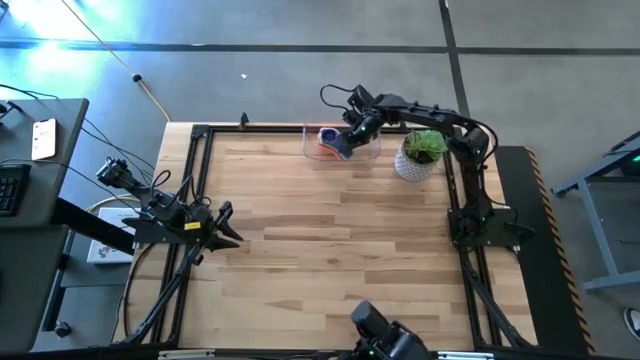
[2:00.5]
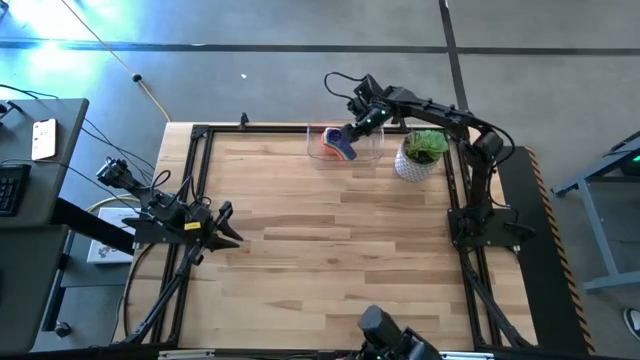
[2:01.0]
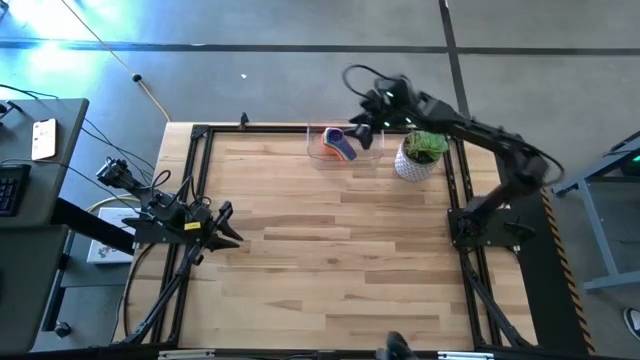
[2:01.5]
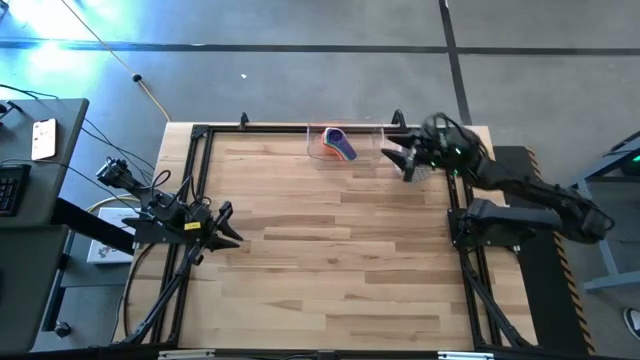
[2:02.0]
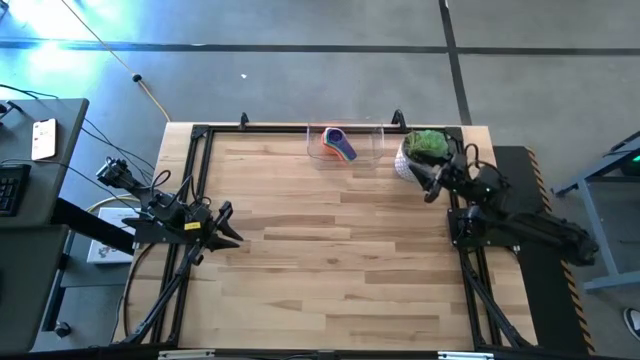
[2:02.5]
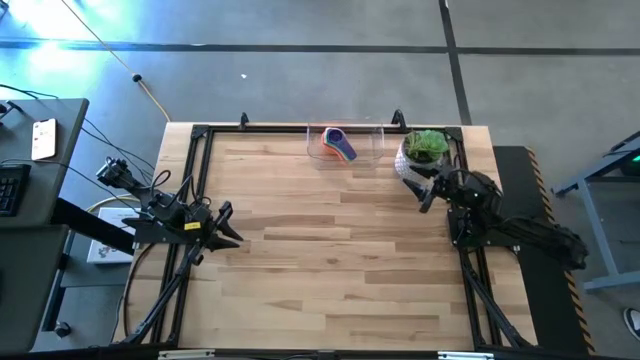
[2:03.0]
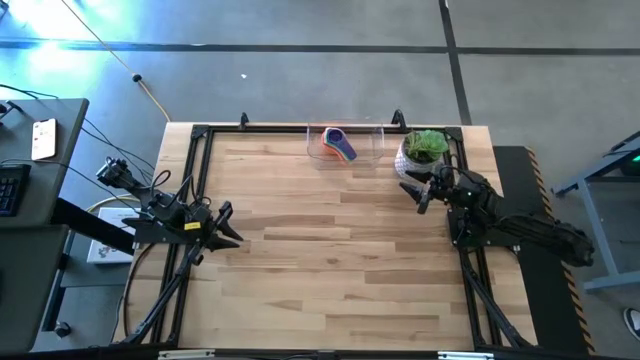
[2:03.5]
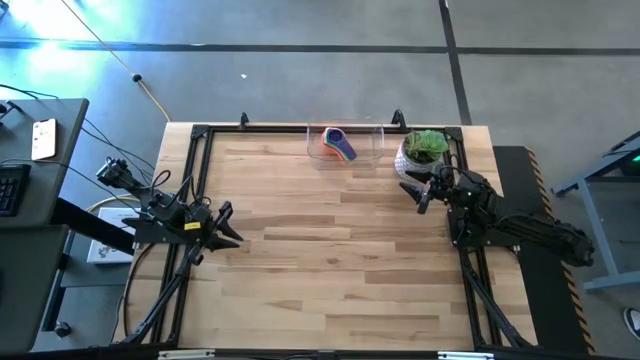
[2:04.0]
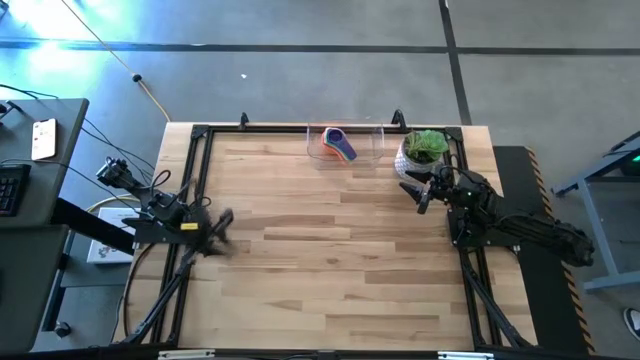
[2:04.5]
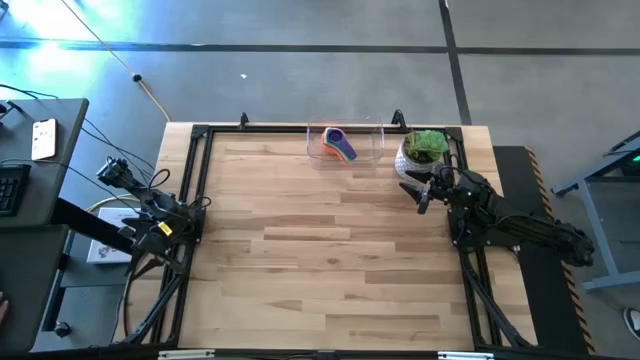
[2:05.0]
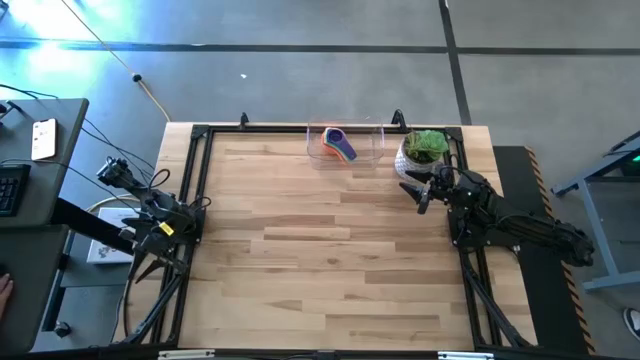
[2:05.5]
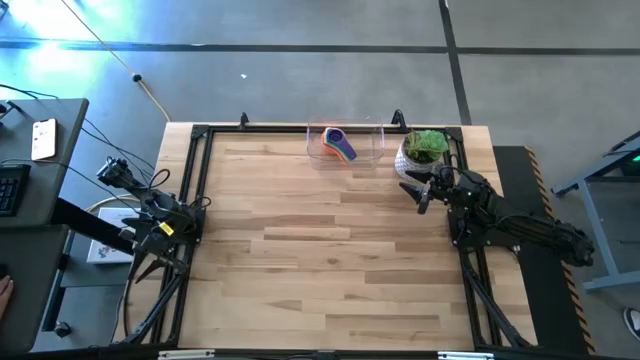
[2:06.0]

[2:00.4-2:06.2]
Task: Nest measuring cups in basket
Return to Home Position

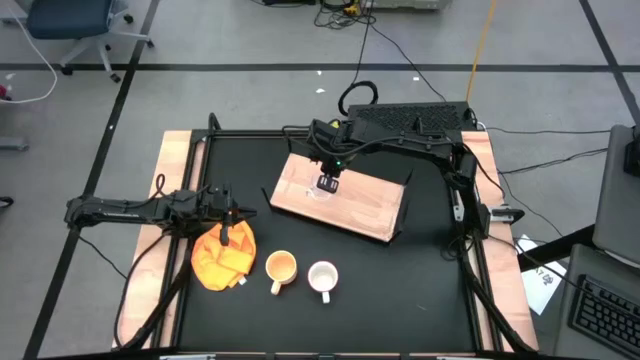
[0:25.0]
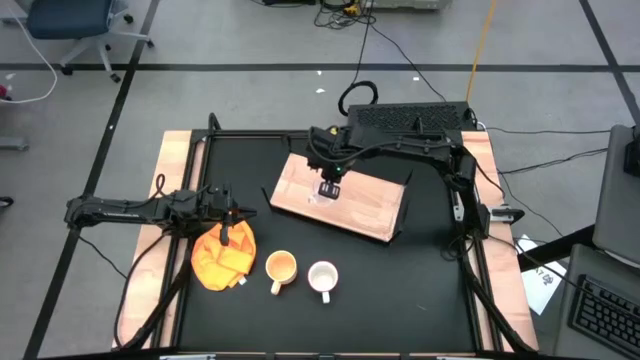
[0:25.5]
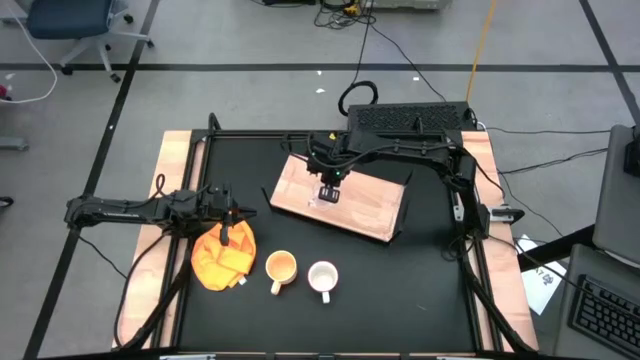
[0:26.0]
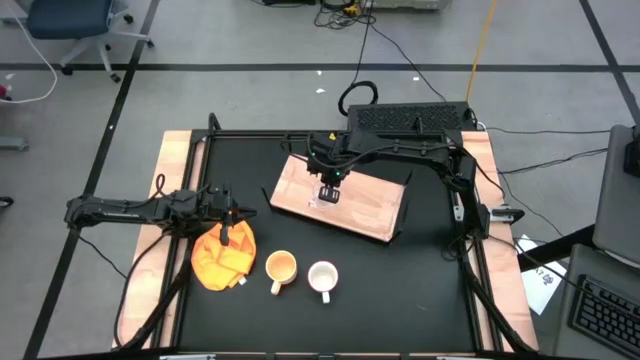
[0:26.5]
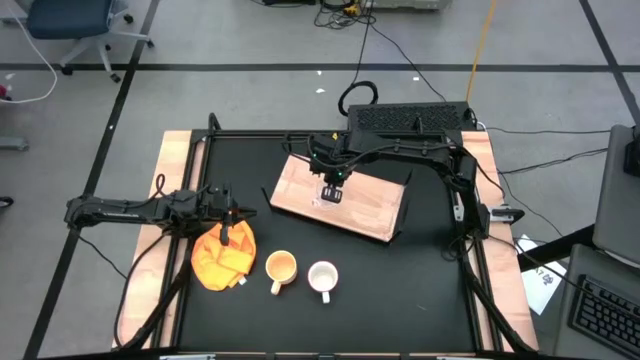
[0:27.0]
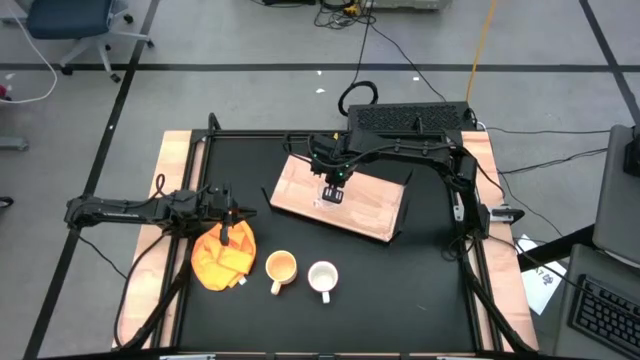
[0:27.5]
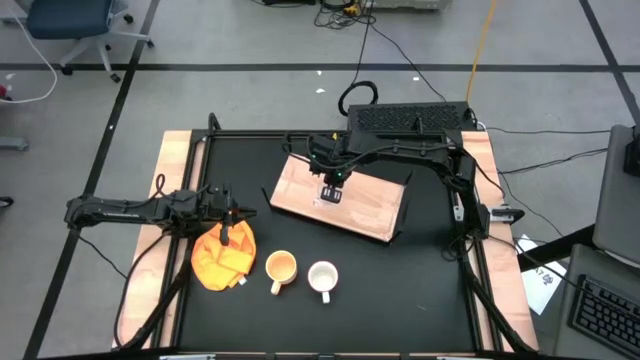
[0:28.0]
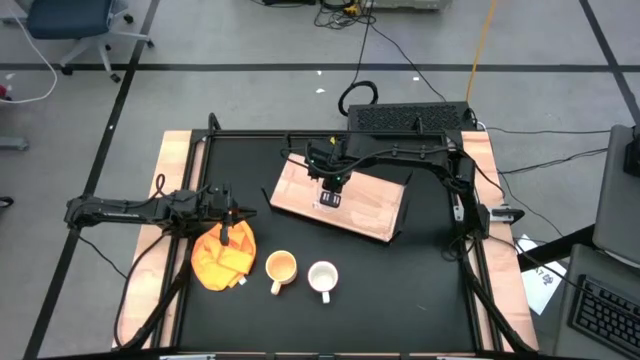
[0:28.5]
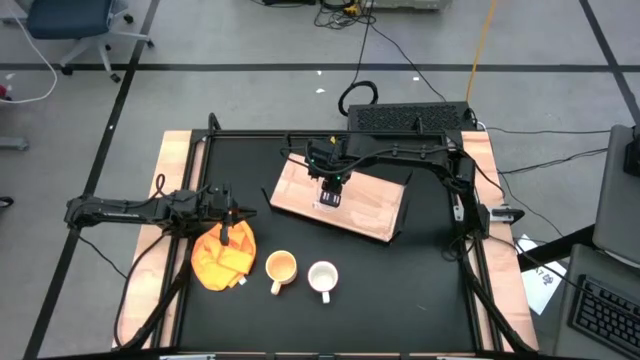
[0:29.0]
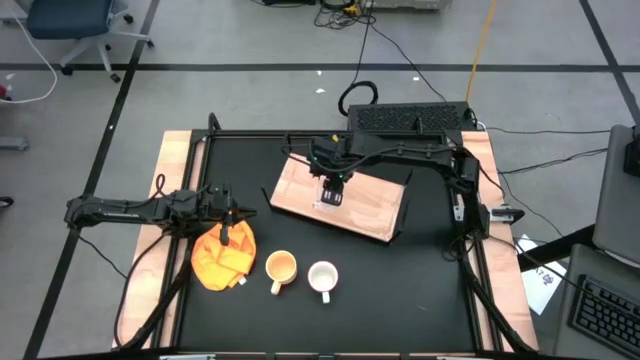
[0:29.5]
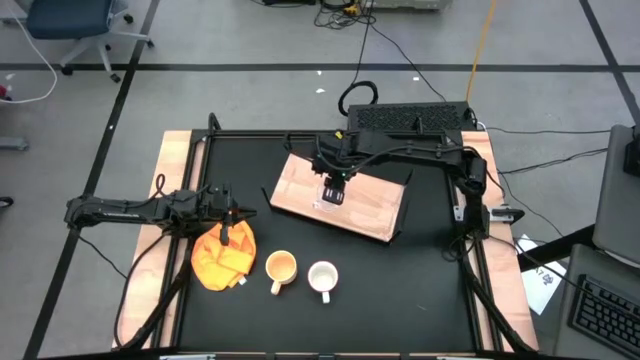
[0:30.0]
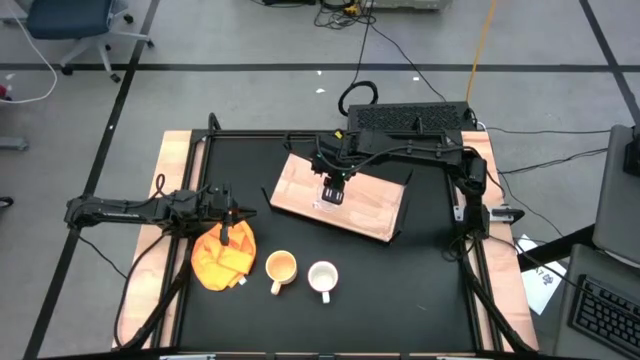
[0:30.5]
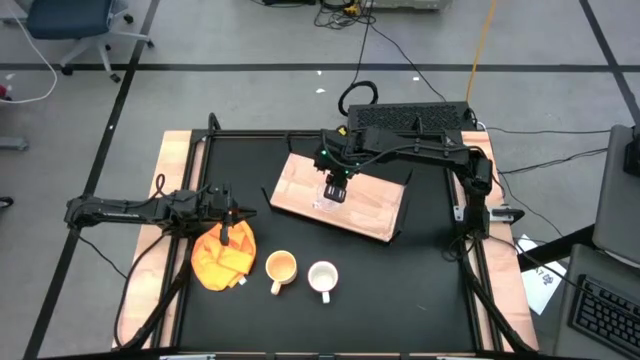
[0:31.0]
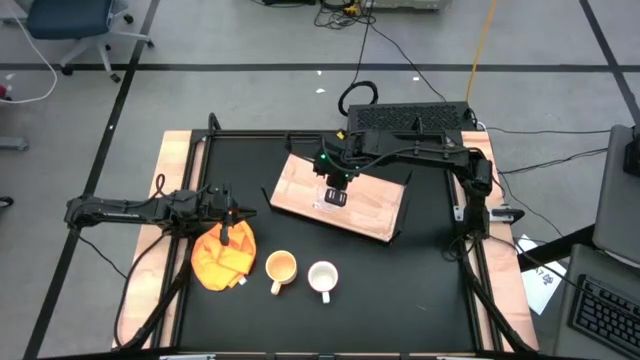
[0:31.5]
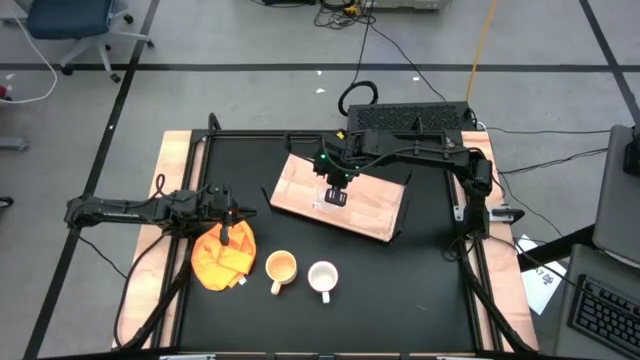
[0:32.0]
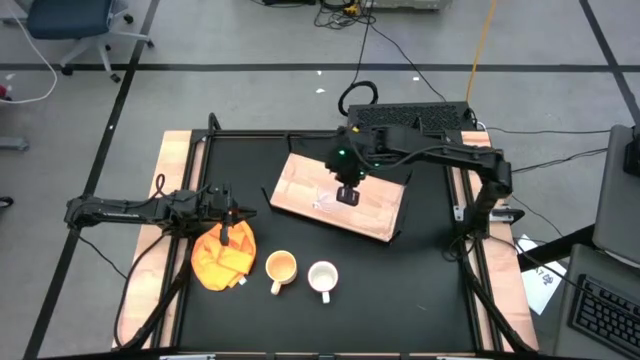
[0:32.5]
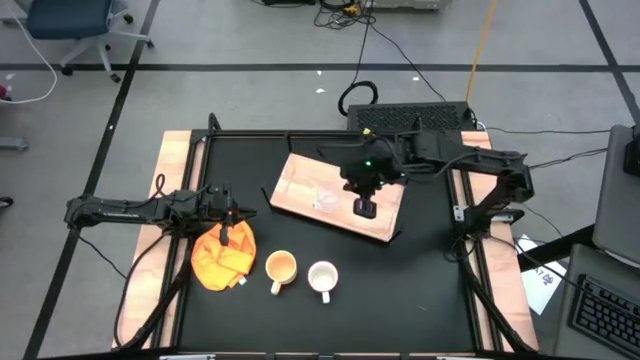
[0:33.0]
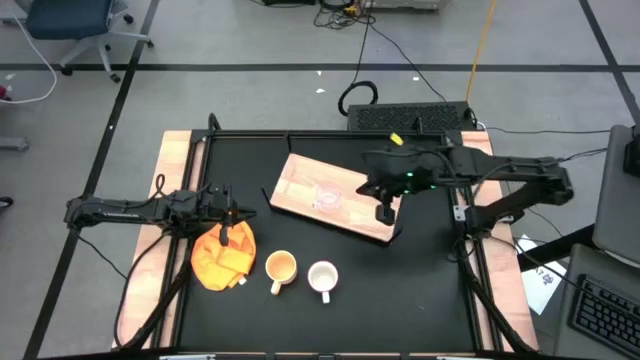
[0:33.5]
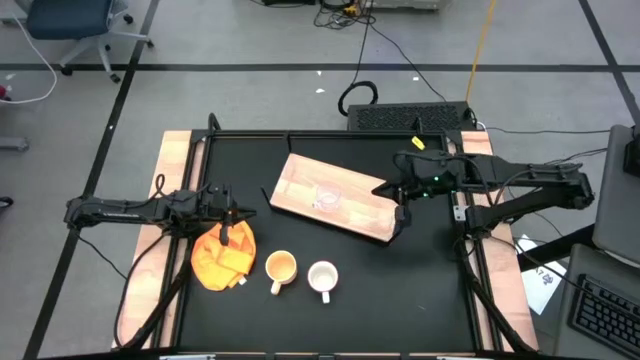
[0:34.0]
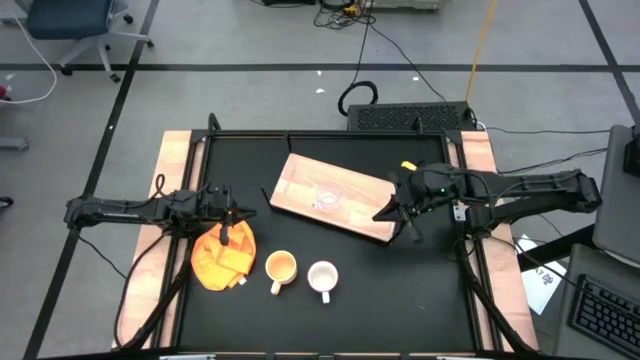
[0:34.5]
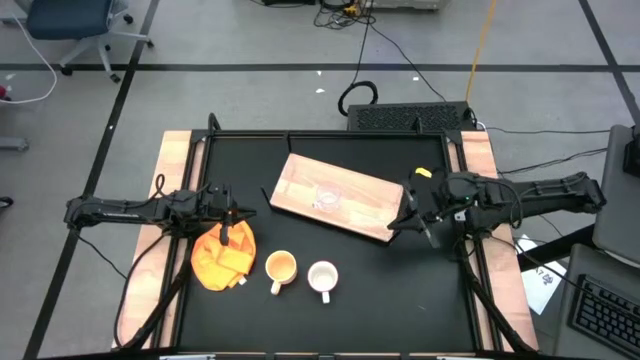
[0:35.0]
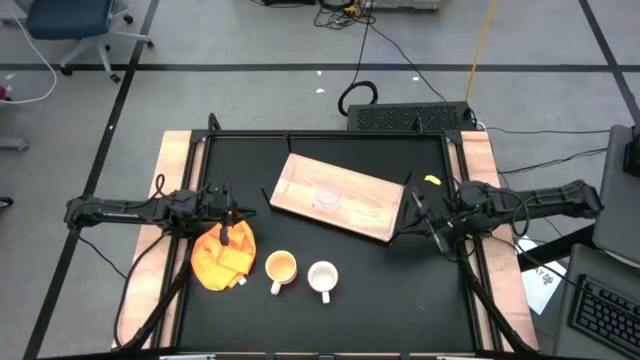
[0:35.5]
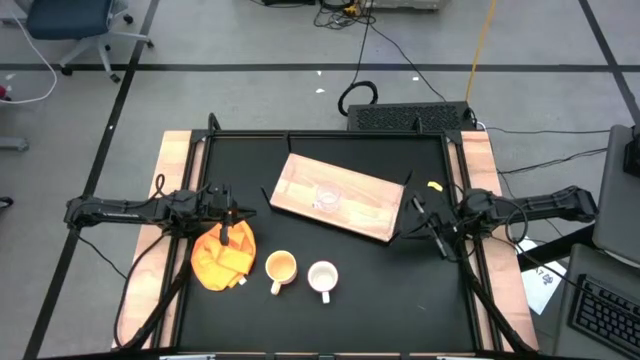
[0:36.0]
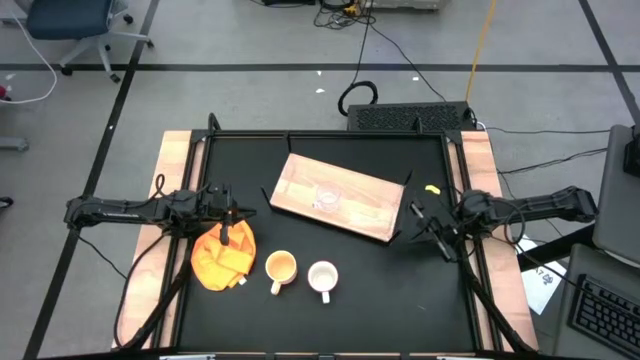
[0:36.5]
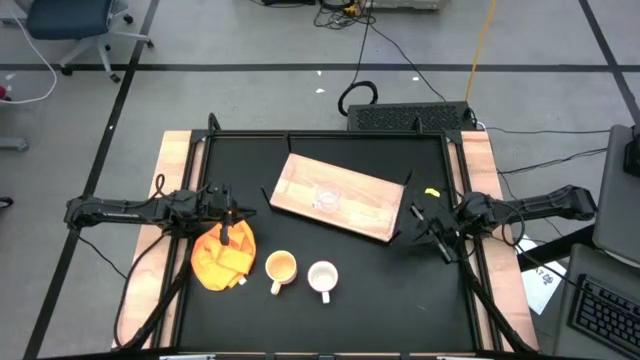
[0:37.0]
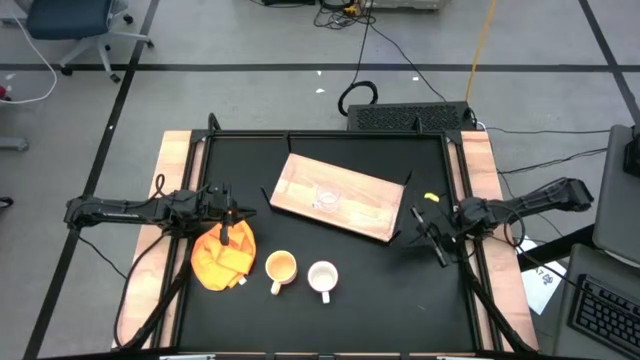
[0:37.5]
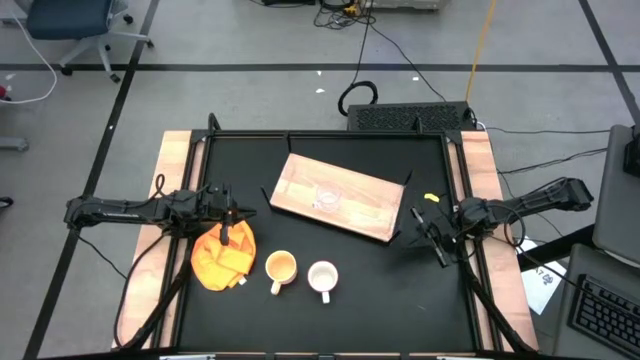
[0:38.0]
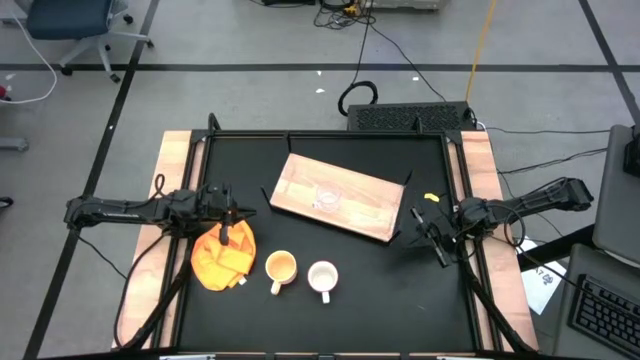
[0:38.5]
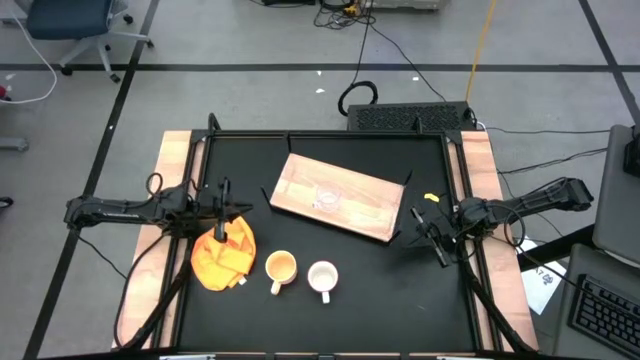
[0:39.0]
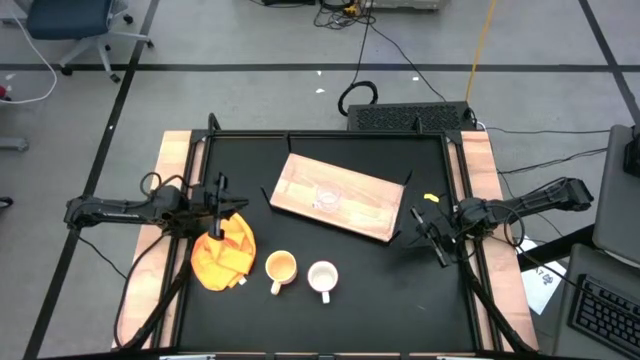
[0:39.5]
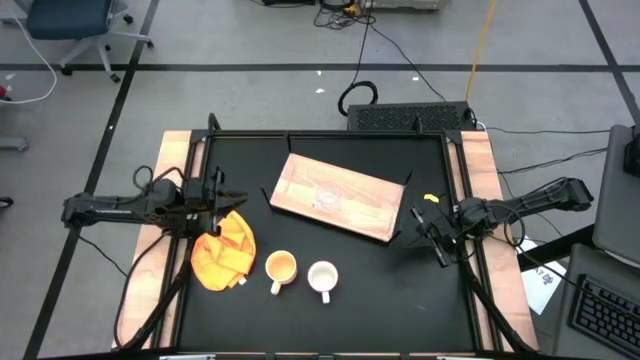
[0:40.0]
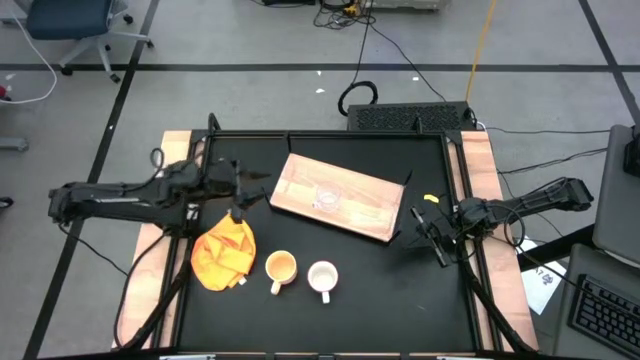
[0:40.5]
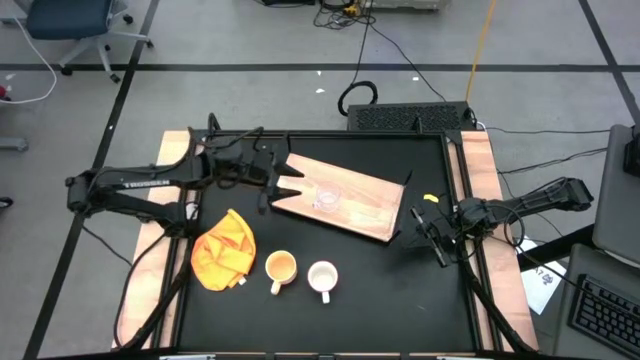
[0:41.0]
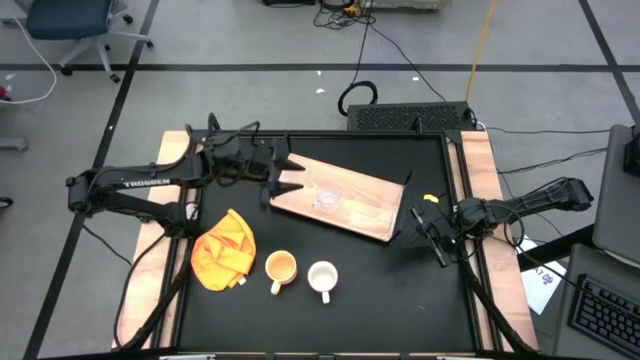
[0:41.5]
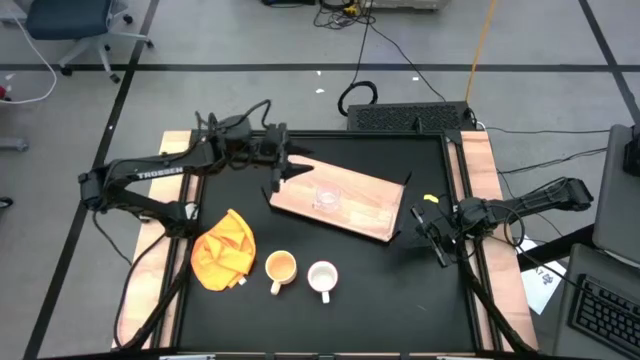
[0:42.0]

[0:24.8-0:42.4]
Task: Stack small to large cups/mugs on shelf
Put the transparent mug on the shelf
